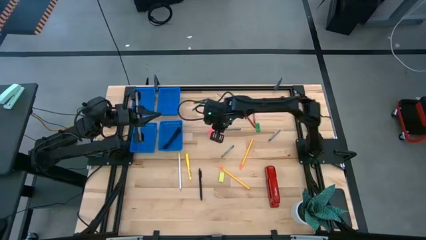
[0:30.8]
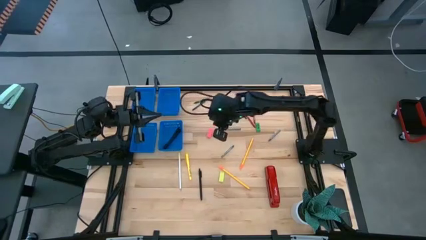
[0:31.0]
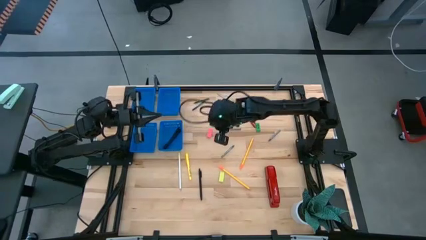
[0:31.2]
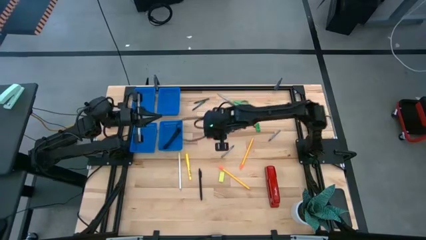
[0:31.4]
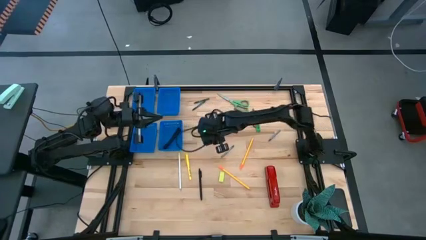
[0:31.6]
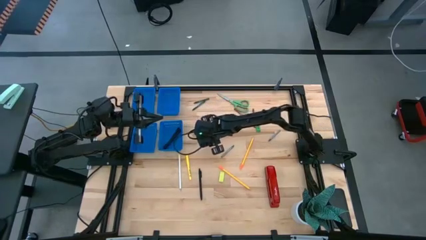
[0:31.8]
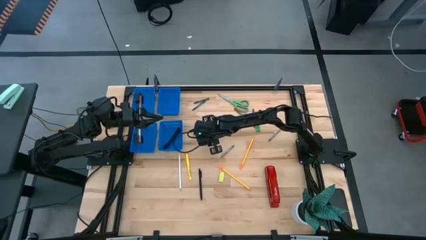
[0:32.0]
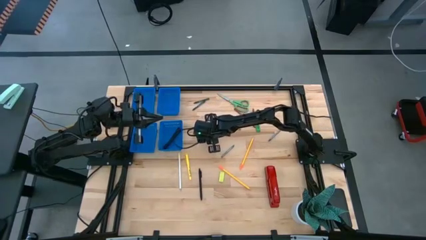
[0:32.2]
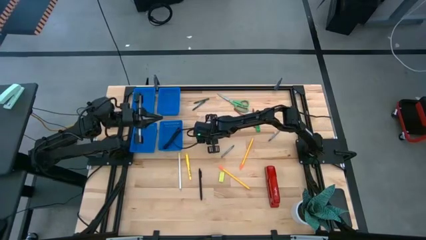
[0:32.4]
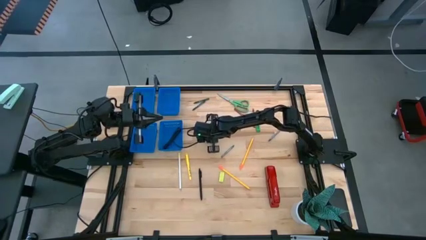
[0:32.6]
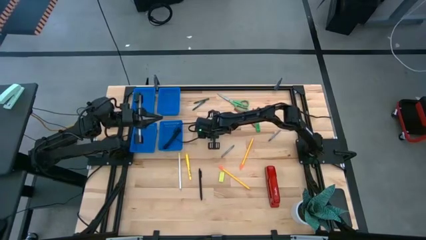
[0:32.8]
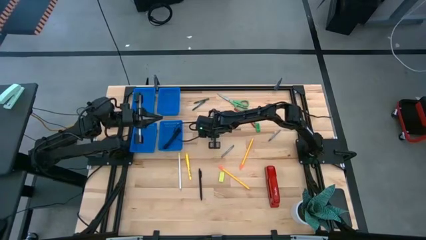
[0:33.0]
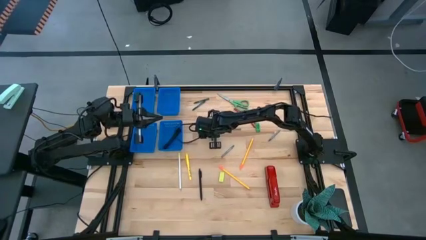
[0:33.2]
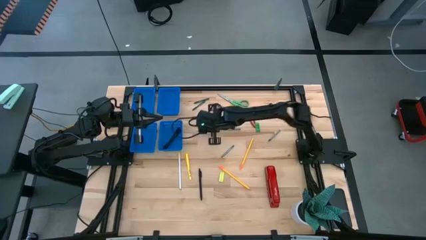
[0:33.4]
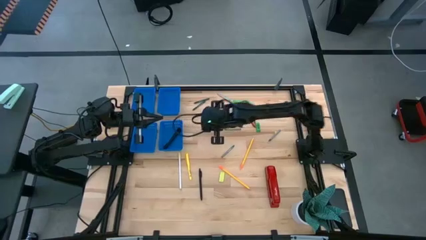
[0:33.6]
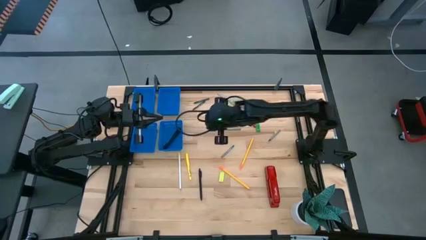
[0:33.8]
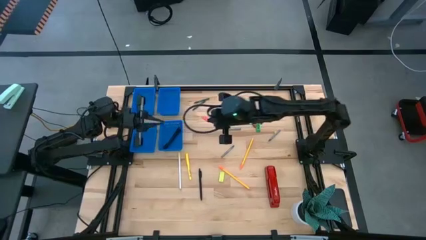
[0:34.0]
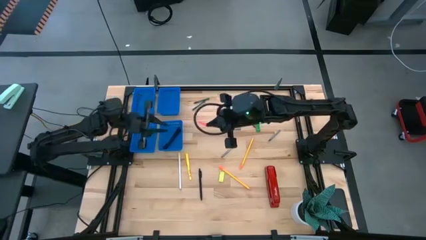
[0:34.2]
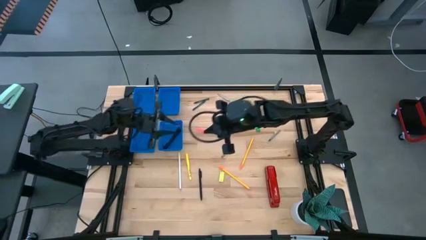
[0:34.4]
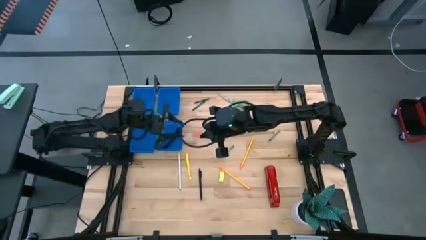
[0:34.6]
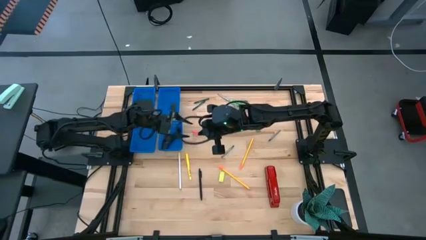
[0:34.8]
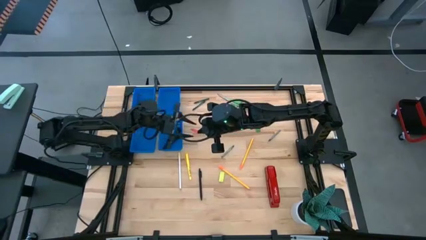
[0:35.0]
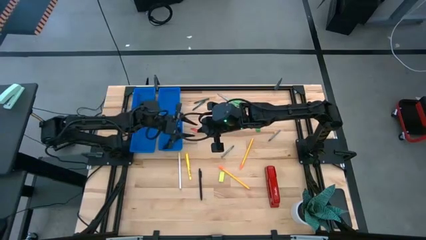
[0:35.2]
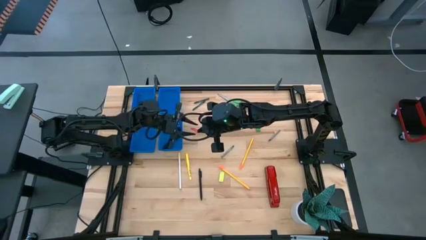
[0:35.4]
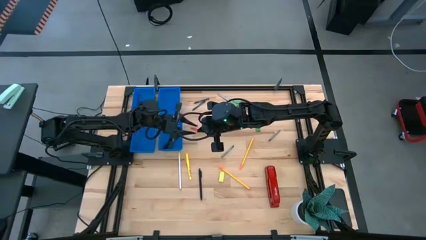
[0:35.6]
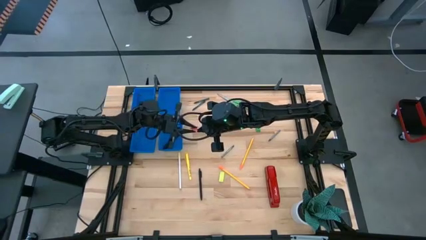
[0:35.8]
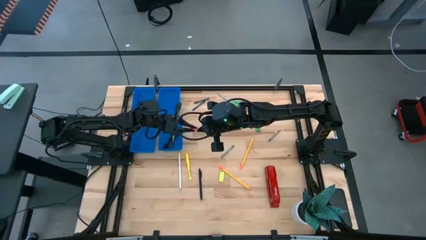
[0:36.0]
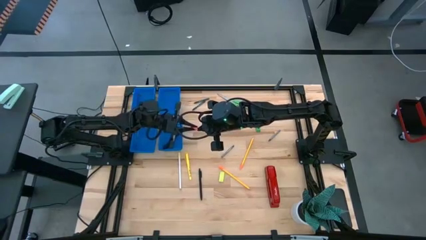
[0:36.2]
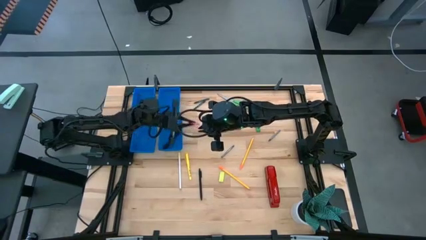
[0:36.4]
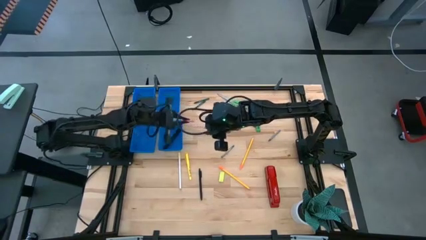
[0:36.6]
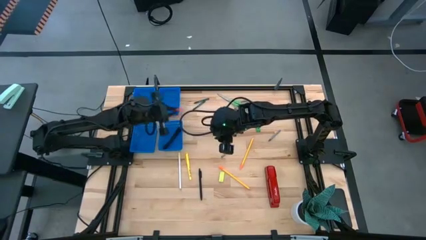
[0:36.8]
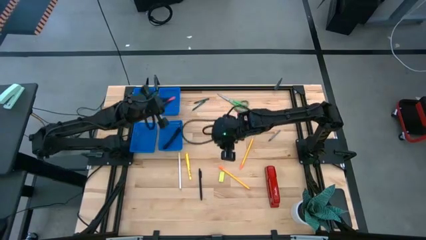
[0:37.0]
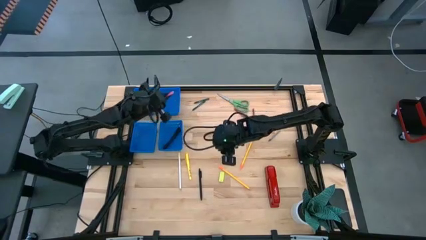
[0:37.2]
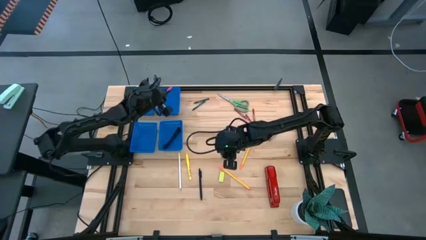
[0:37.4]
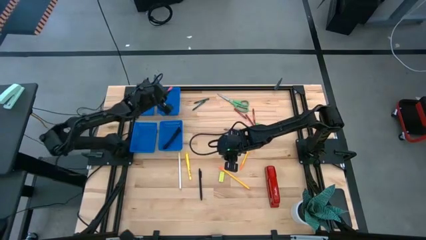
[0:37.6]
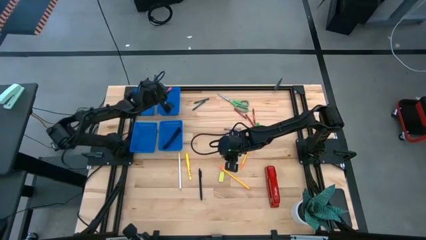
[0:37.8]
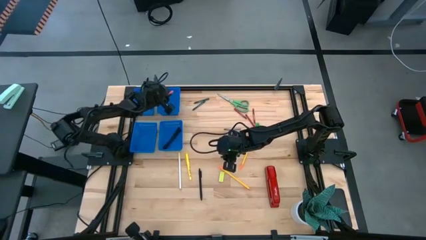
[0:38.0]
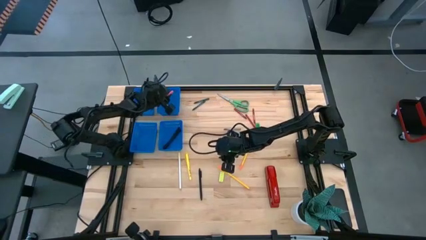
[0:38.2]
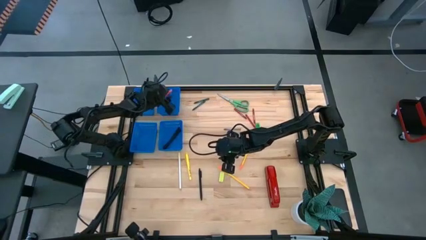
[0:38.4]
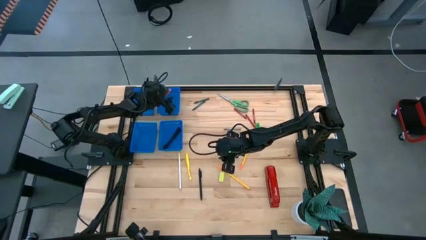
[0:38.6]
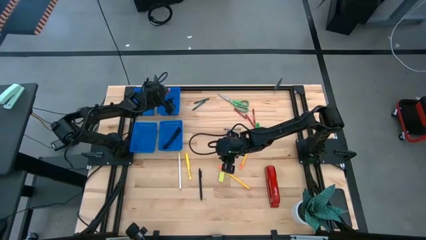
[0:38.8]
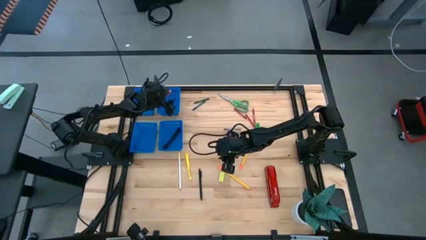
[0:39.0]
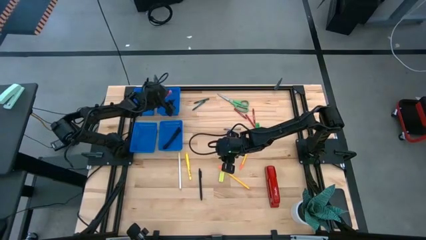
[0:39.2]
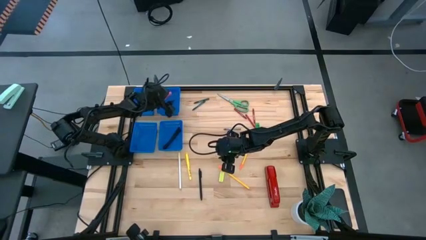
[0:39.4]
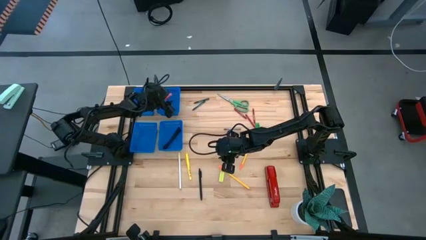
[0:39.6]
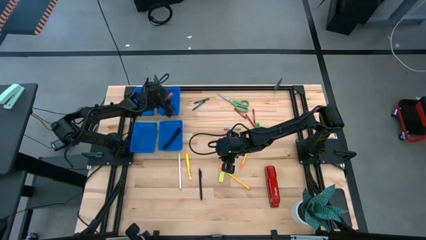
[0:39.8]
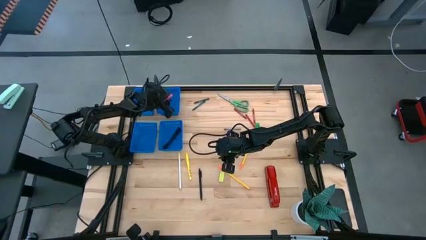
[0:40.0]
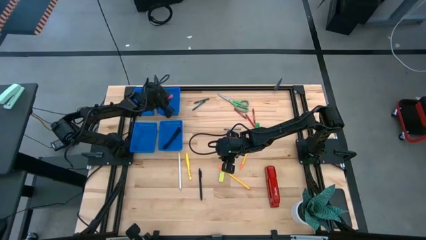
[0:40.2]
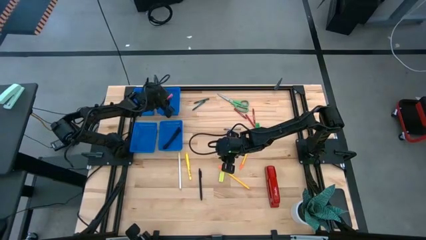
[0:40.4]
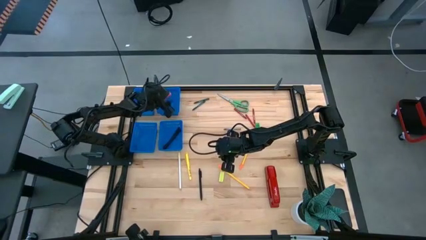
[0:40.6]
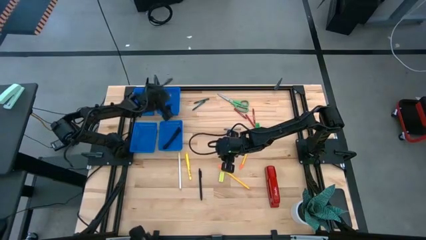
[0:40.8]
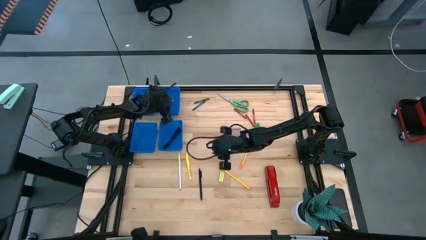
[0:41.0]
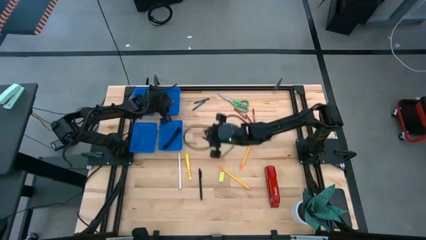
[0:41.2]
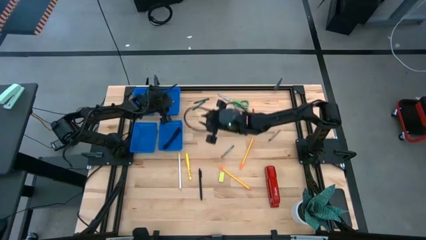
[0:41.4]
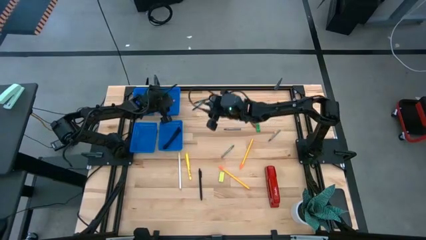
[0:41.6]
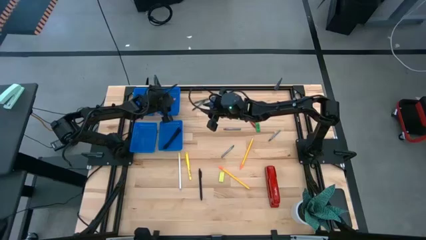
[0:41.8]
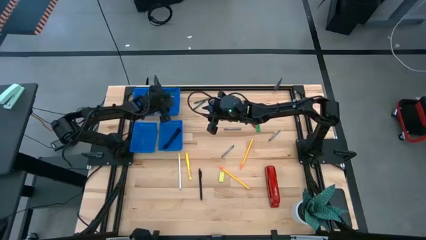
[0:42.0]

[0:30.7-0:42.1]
Task: Sort crayons/erasers/pens/pencils in bins
Put the pink eraser into the top right blue bin

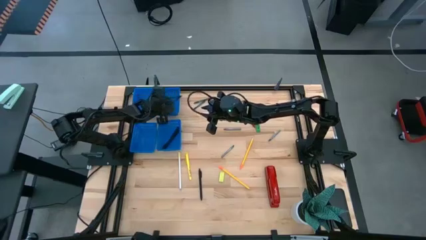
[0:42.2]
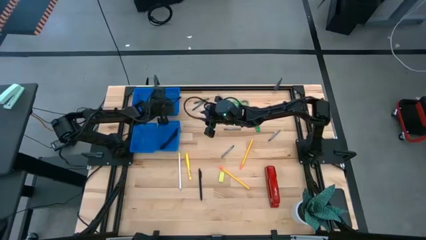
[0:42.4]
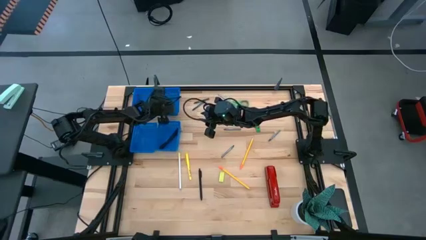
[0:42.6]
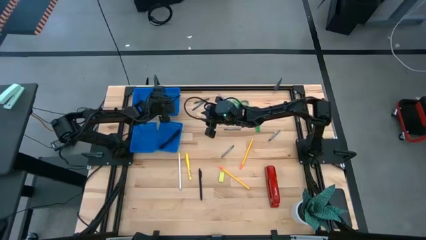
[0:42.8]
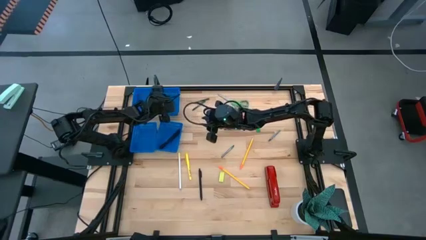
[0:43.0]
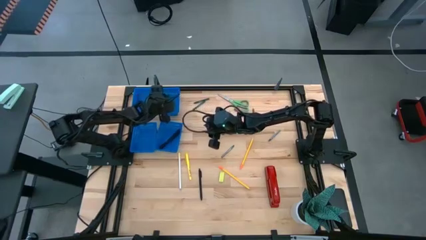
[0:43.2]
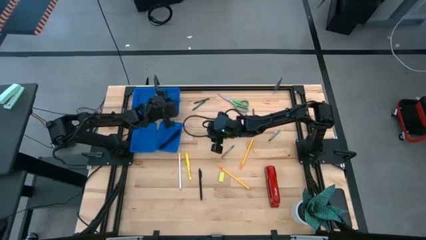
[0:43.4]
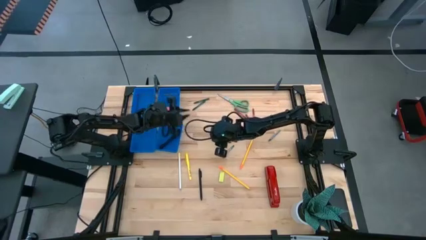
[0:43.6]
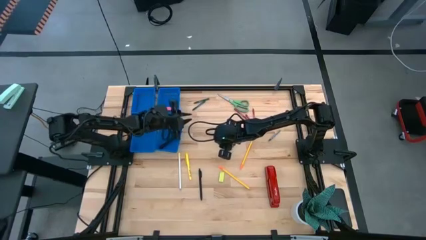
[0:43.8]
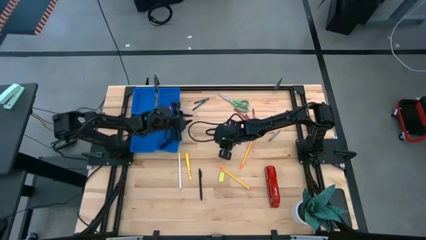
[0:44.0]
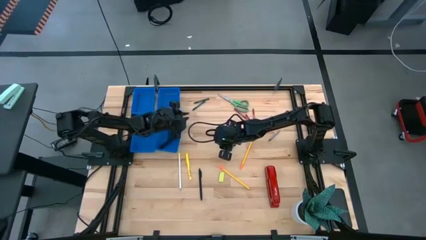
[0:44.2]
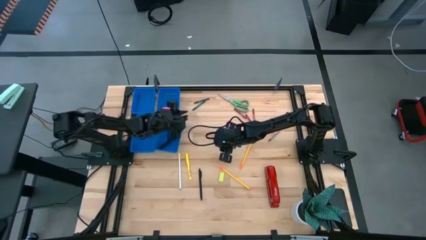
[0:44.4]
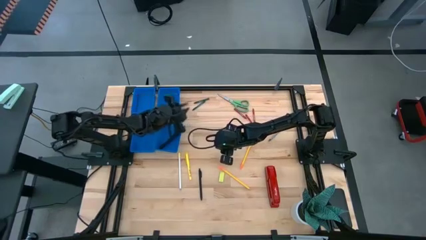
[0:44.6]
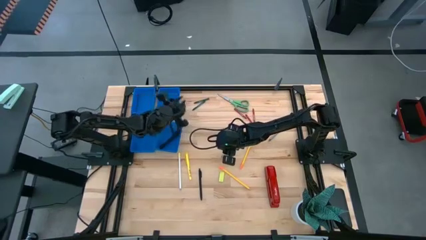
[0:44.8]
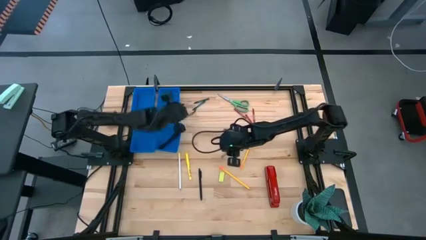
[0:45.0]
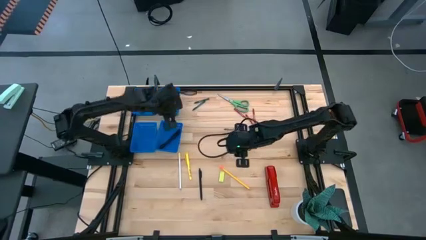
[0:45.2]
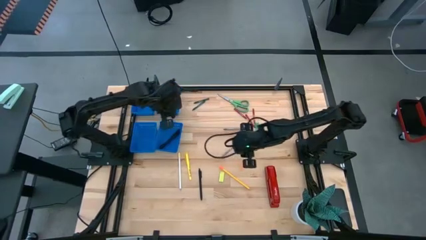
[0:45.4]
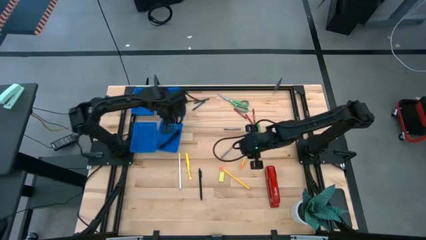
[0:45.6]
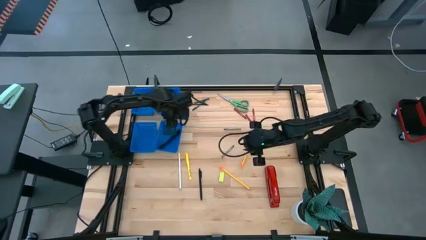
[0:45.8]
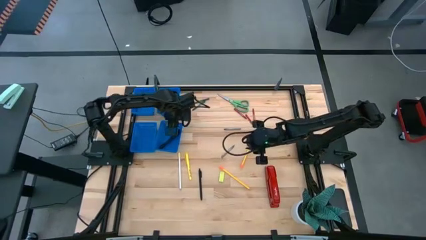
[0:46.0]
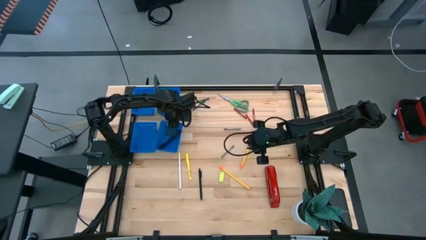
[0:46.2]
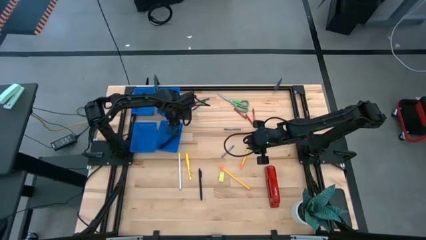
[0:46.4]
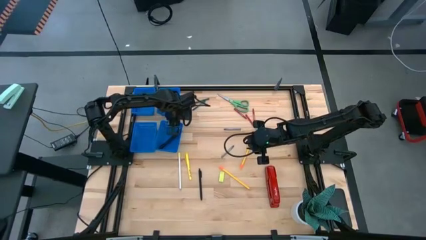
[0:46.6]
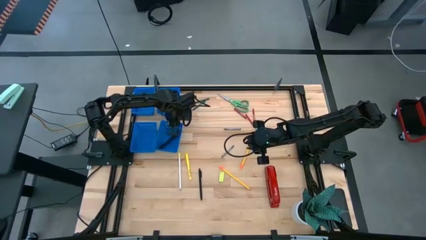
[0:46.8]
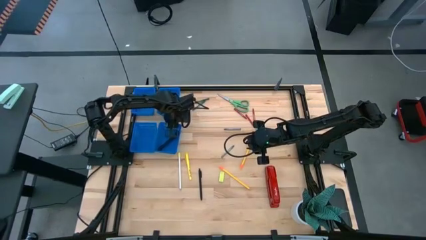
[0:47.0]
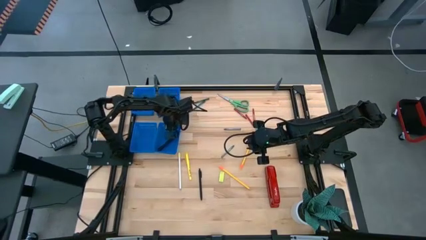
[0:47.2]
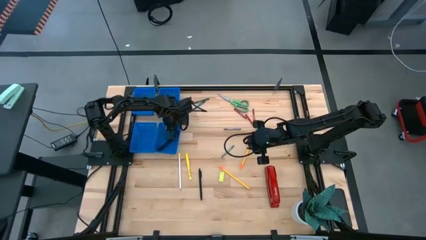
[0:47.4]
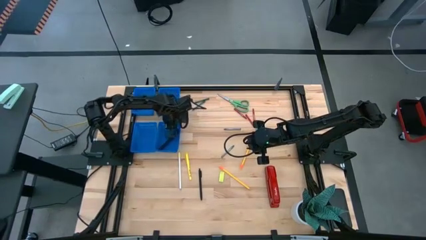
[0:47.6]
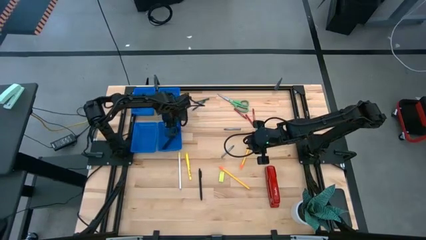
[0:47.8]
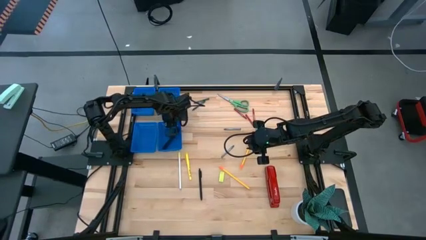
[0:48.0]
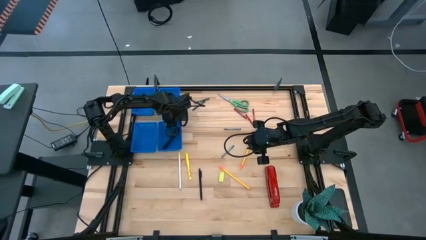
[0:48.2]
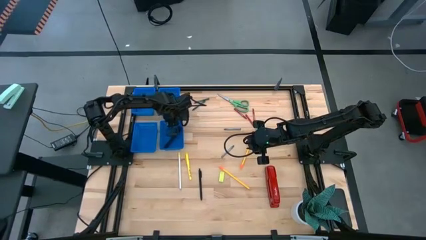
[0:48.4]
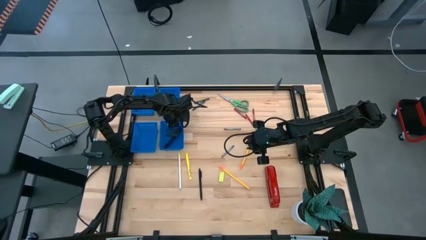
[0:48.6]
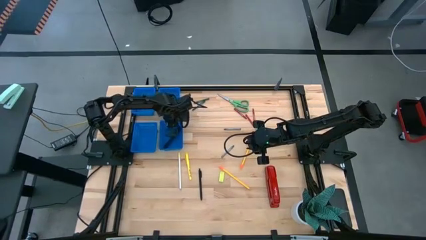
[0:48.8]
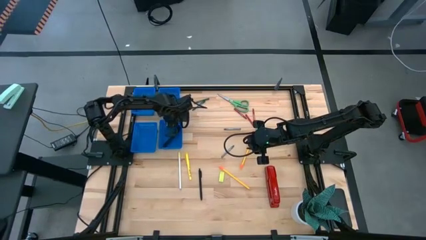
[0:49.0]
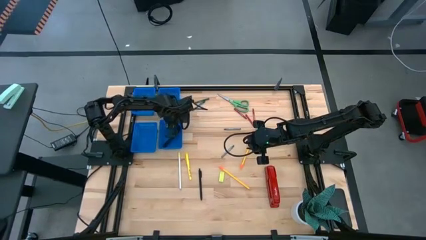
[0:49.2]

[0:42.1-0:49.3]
Adjust the bottom right blue bin
